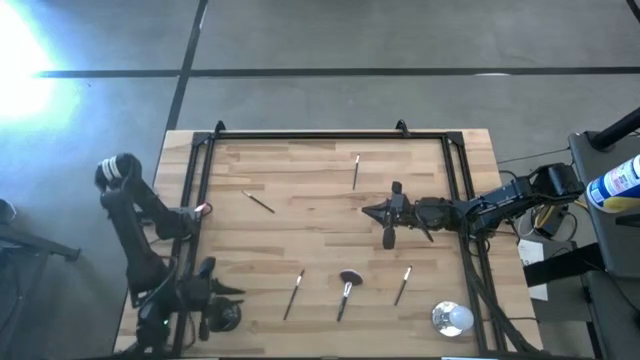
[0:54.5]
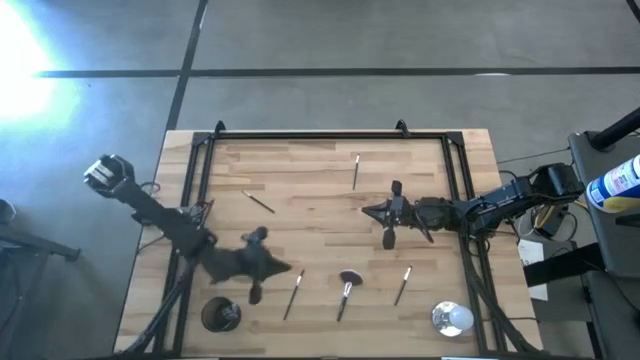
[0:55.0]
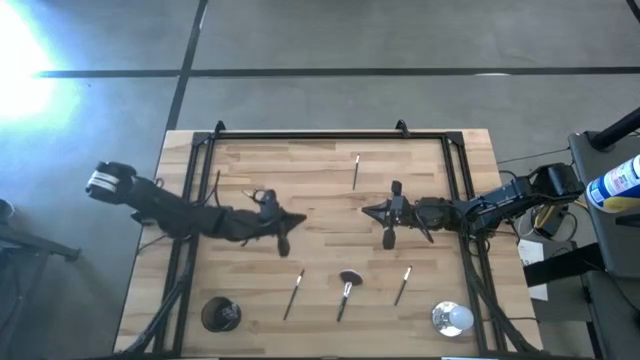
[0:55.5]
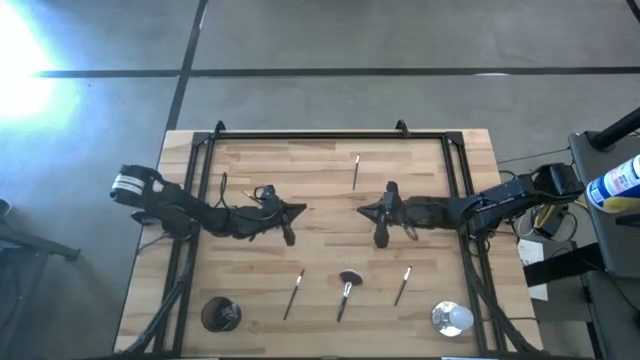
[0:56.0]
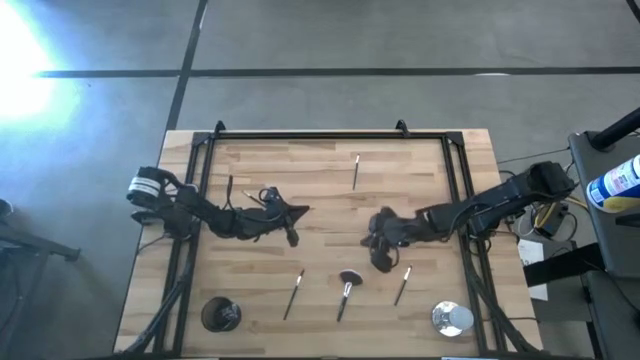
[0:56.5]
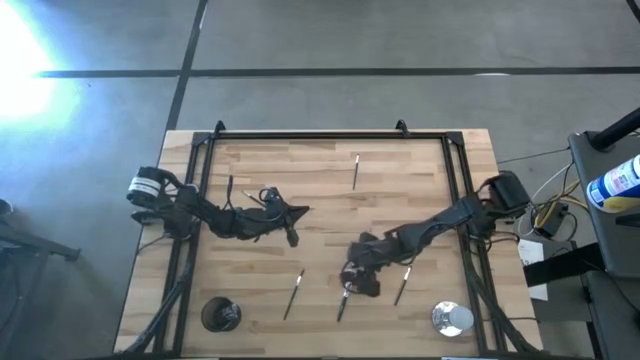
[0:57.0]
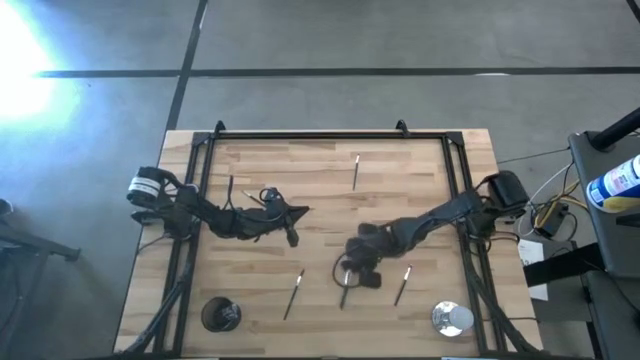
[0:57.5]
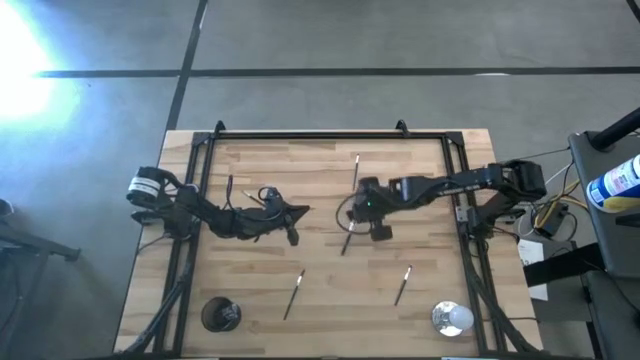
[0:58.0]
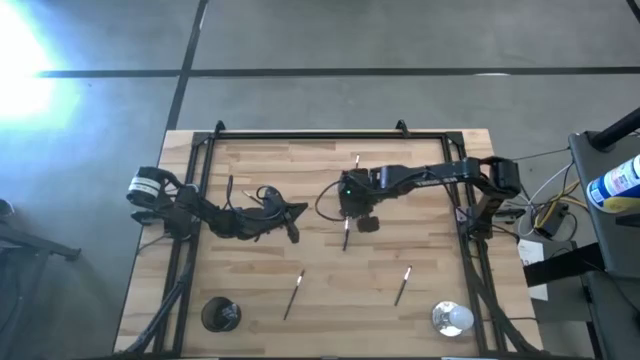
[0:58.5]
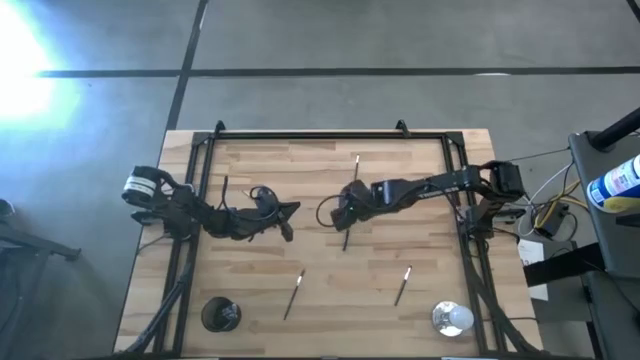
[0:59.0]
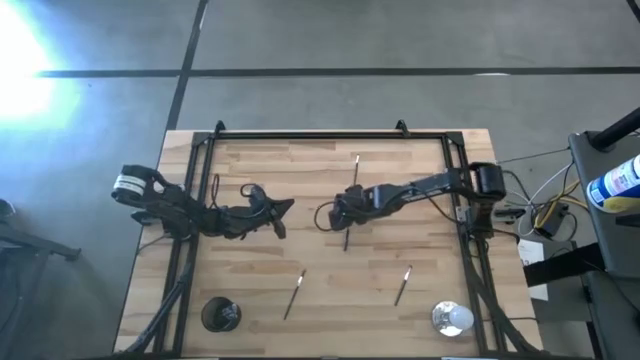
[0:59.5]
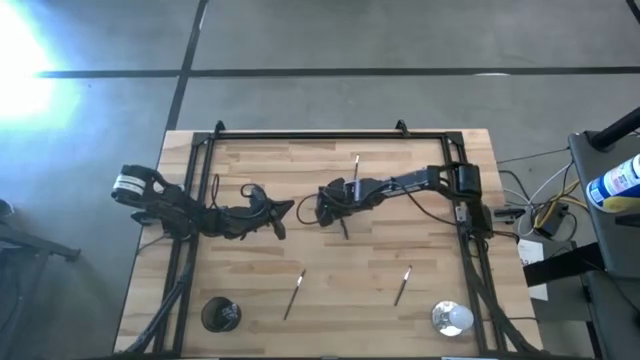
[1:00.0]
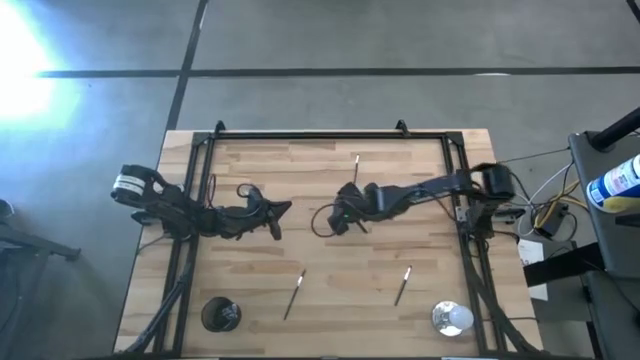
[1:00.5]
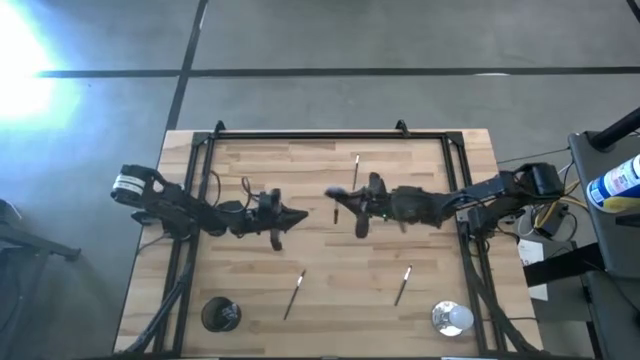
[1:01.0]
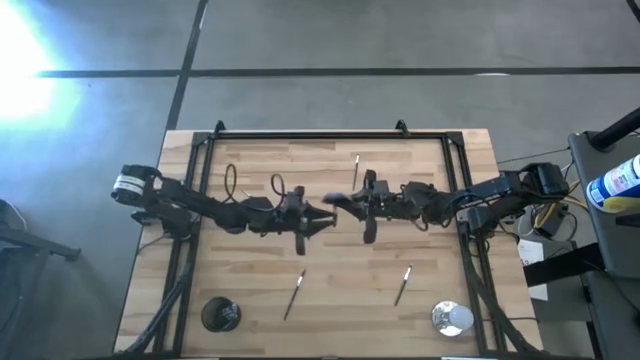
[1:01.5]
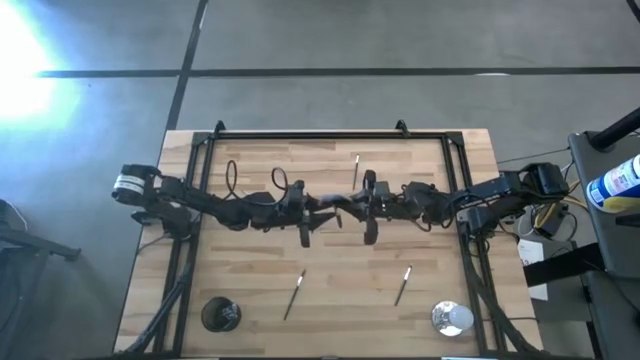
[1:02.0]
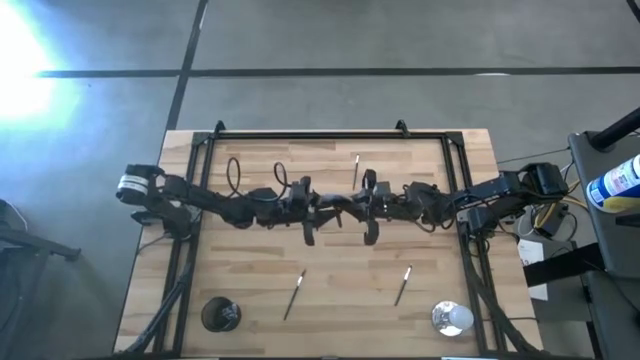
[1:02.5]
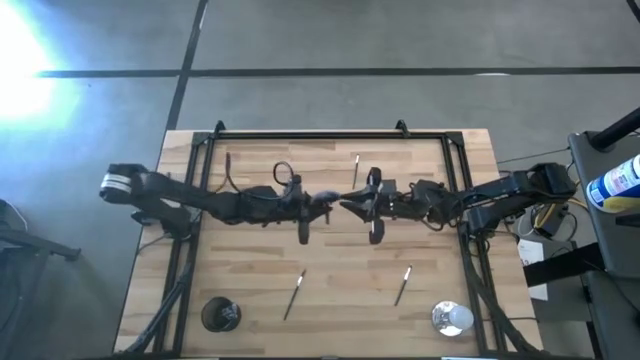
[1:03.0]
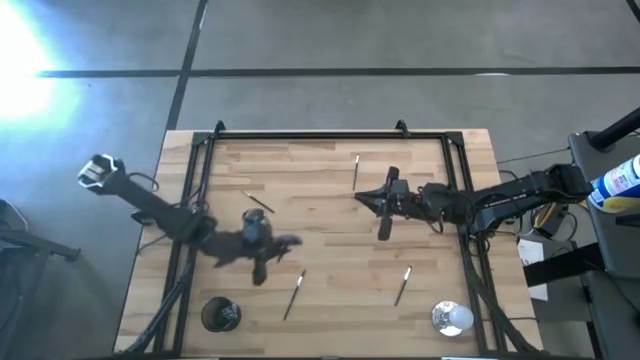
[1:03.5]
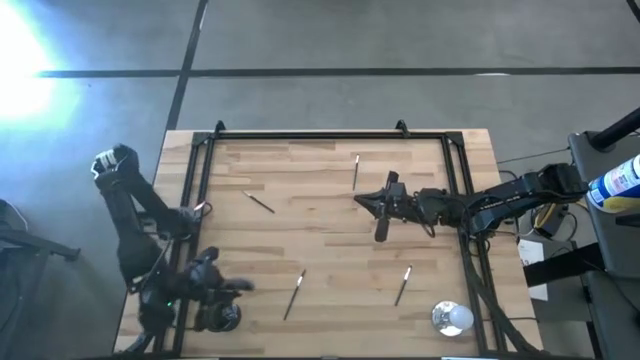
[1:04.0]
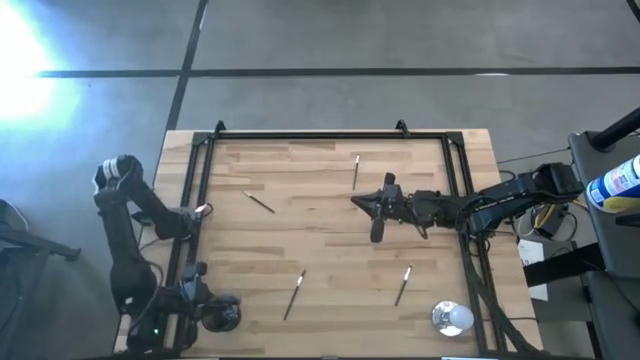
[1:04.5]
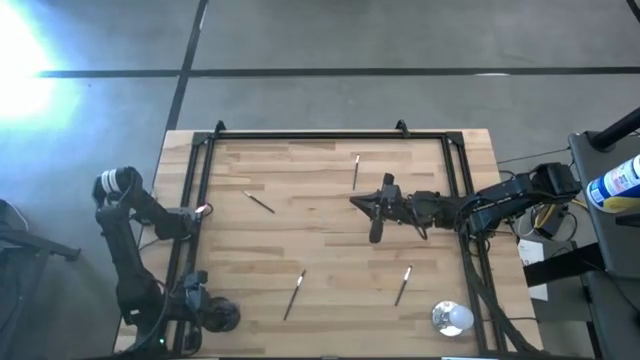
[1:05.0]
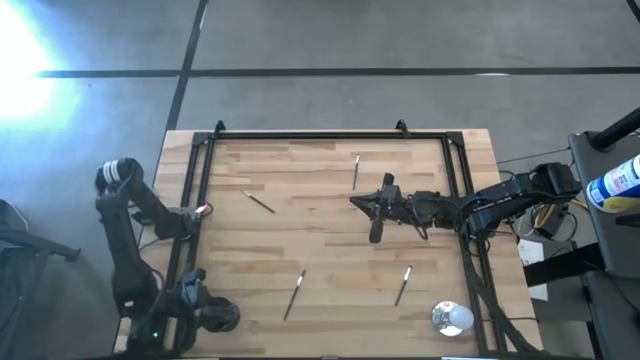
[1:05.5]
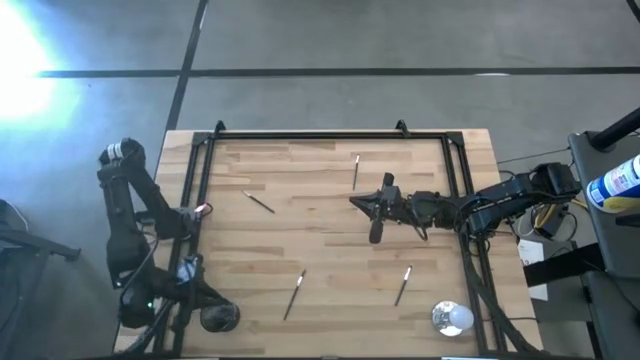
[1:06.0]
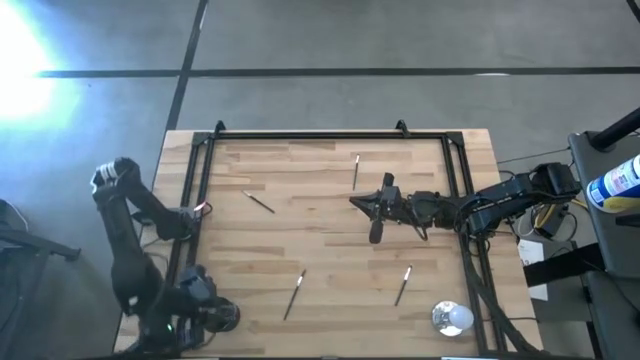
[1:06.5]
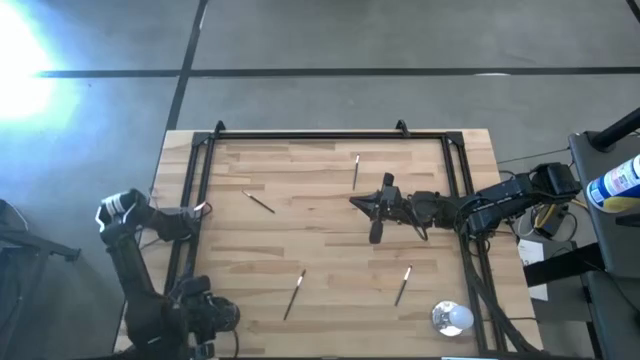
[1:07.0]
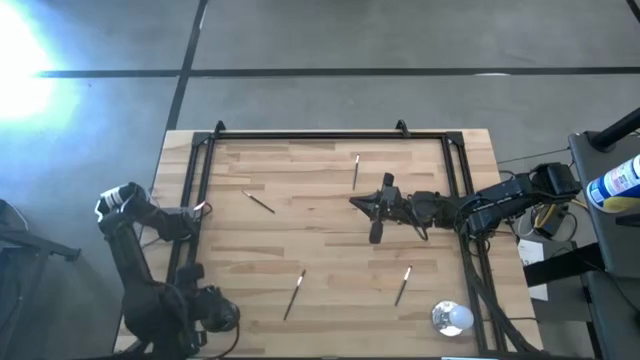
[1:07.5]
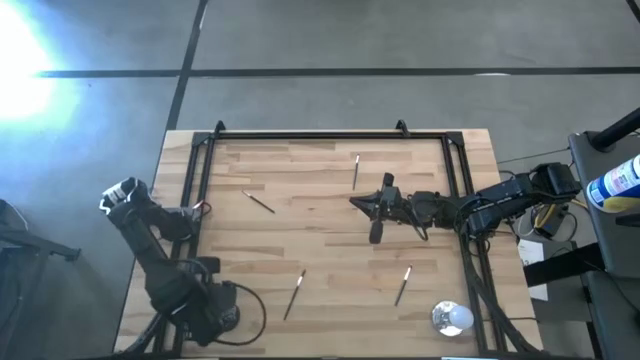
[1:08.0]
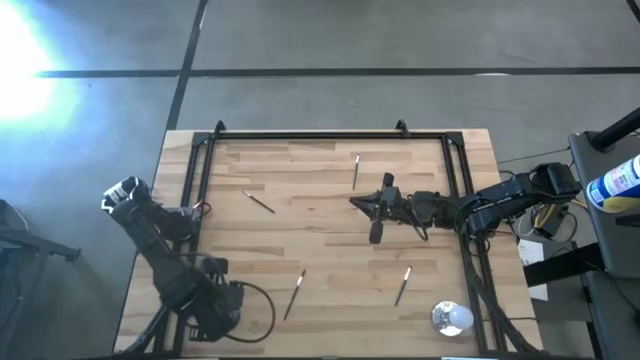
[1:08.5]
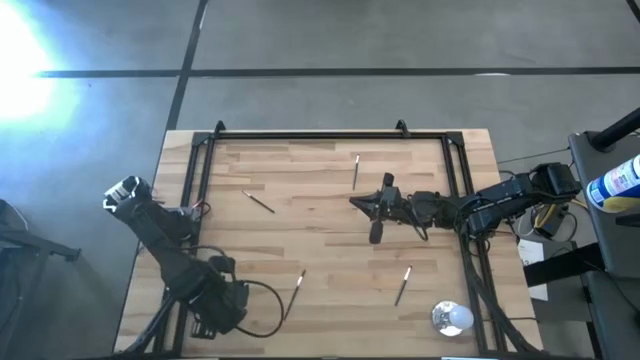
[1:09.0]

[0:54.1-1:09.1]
Task: Pick & Place Makeup Brushes
Put the black highlighter brush into the makeup holder

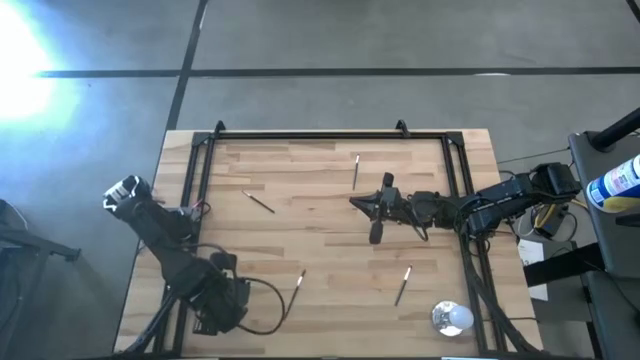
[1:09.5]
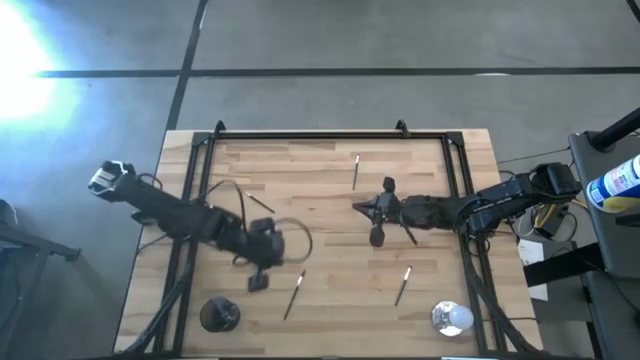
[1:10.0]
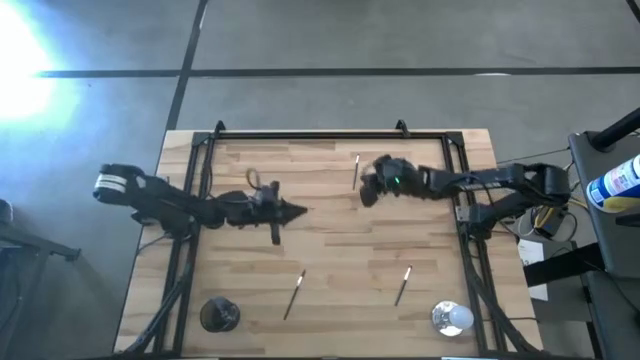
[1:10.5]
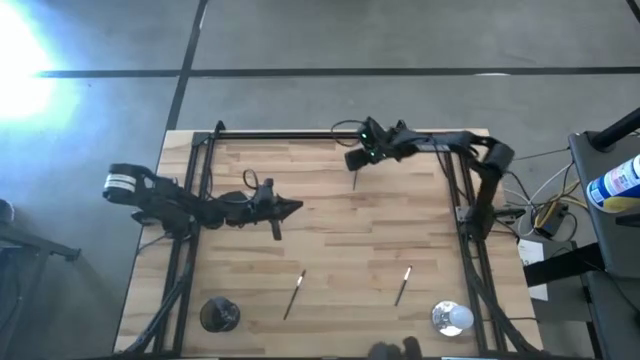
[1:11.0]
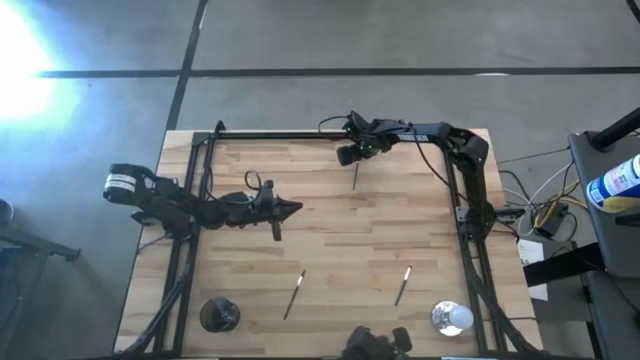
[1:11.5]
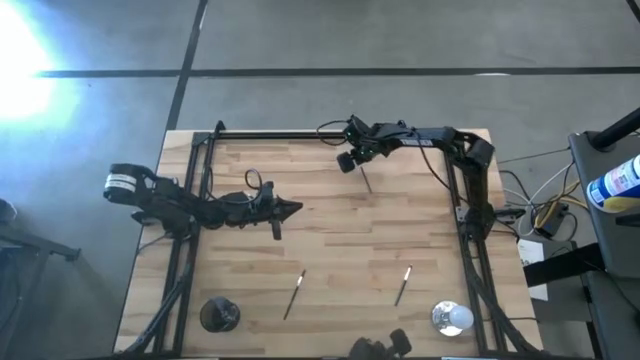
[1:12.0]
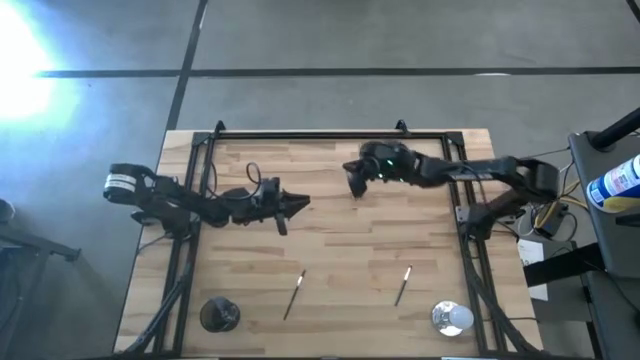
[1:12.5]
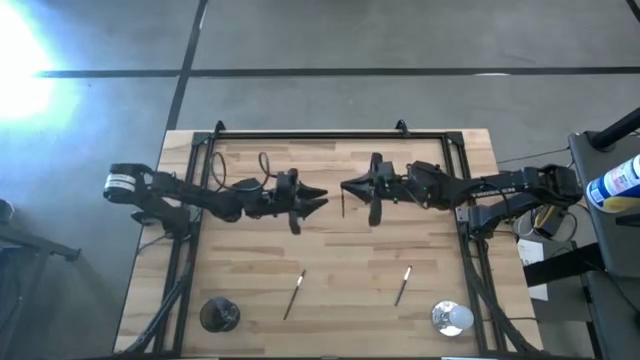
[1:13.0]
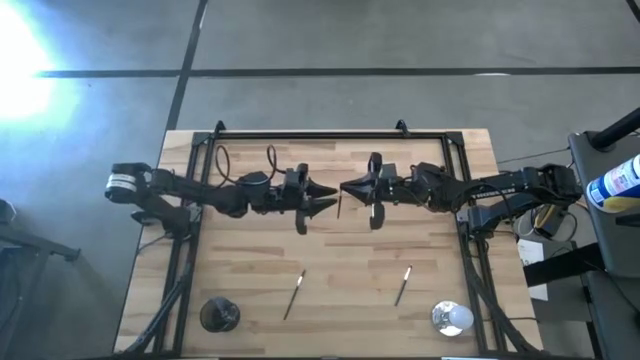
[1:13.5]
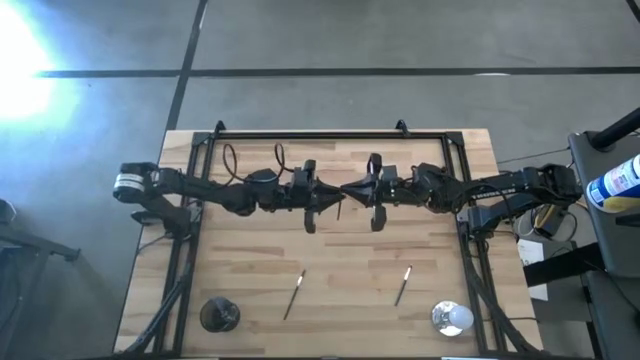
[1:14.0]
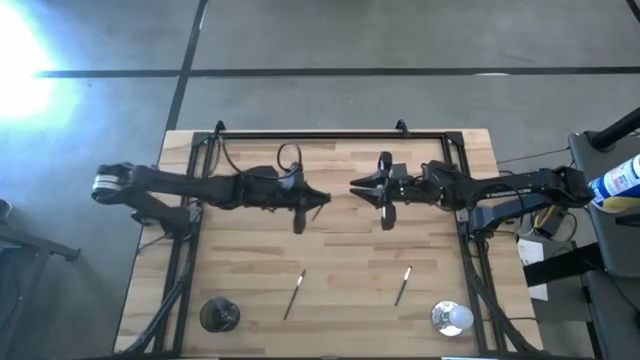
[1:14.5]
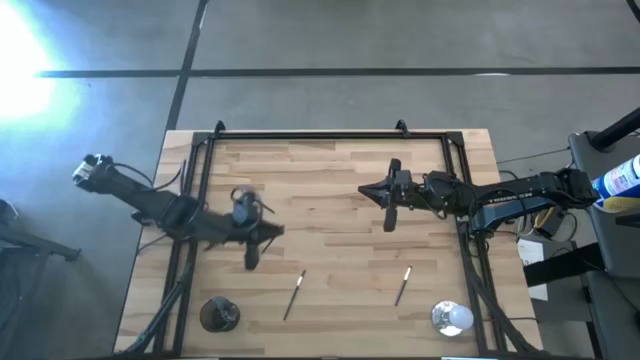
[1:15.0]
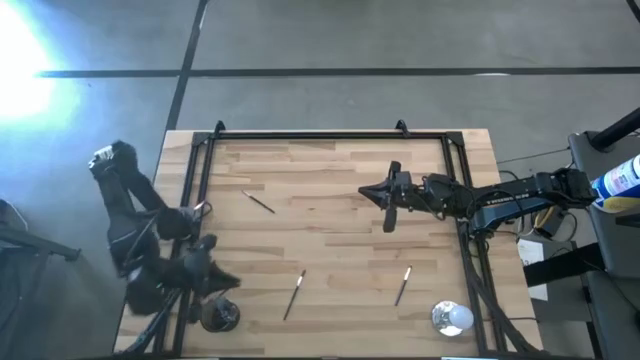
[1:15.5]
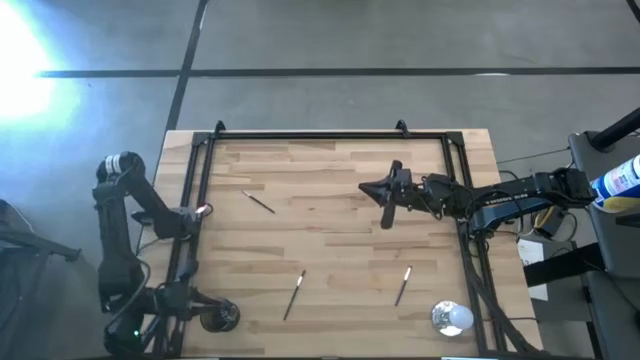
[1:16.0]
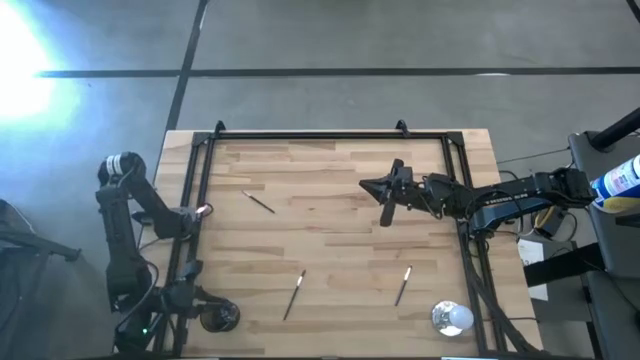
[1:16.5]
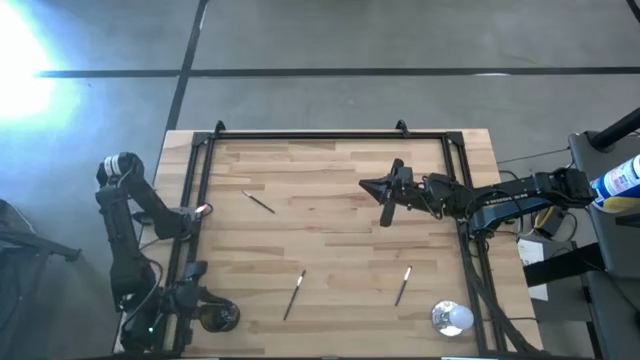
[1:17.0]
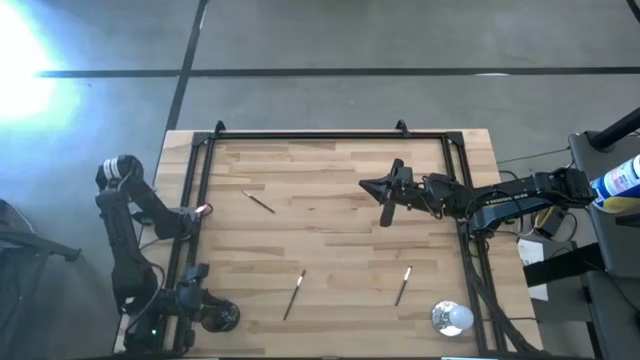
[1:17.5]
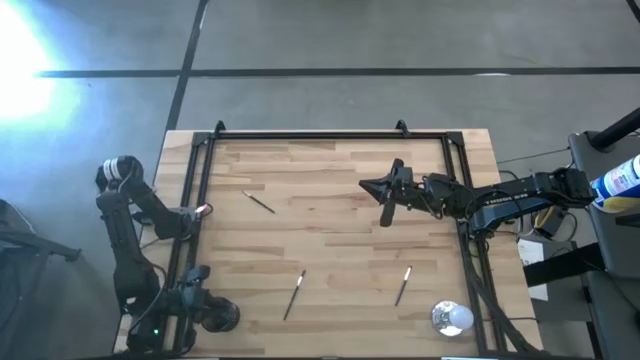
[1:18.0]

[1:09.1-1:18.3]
Put the black eyeshadow brush into the makeup holder
